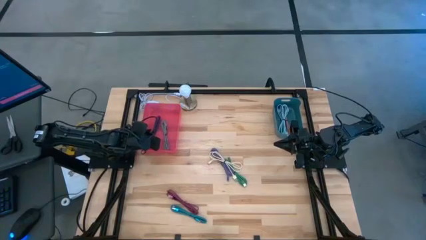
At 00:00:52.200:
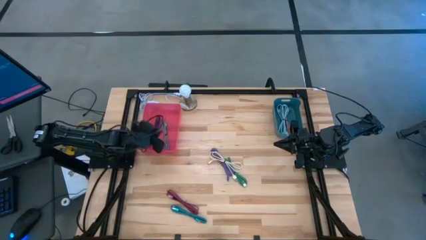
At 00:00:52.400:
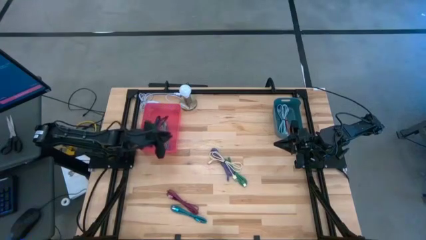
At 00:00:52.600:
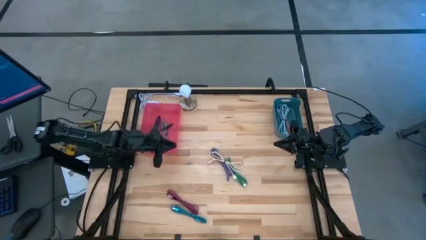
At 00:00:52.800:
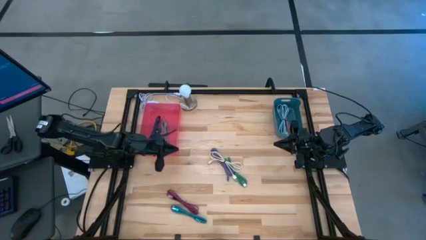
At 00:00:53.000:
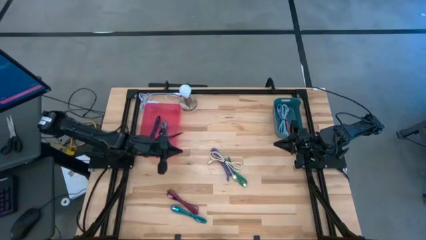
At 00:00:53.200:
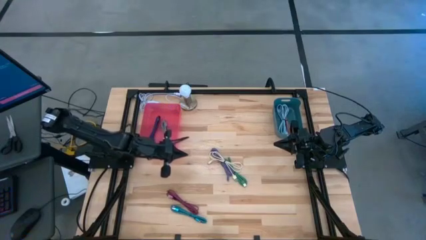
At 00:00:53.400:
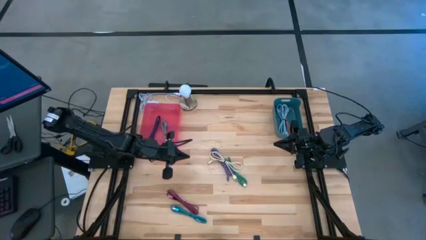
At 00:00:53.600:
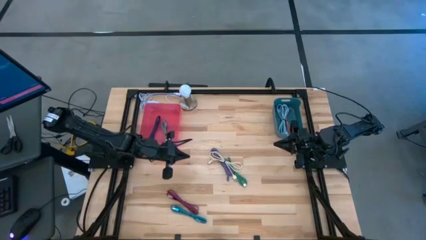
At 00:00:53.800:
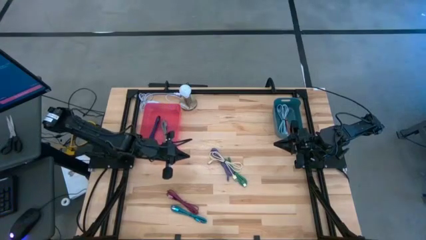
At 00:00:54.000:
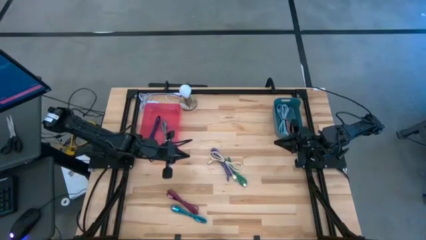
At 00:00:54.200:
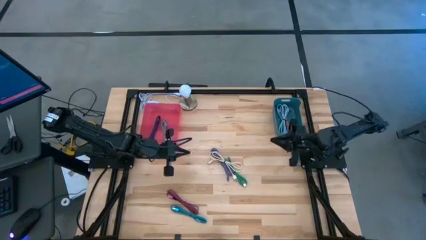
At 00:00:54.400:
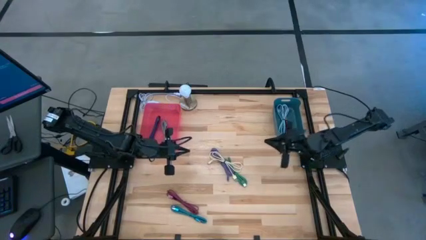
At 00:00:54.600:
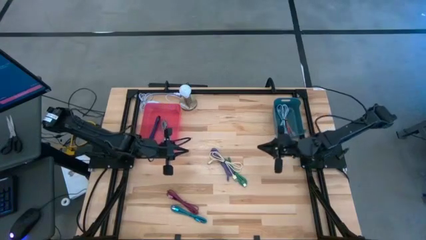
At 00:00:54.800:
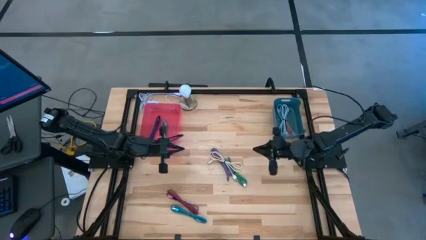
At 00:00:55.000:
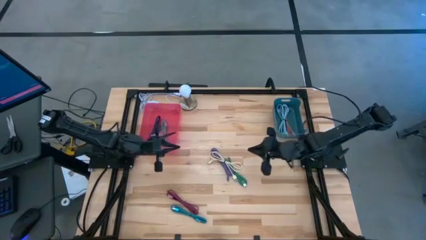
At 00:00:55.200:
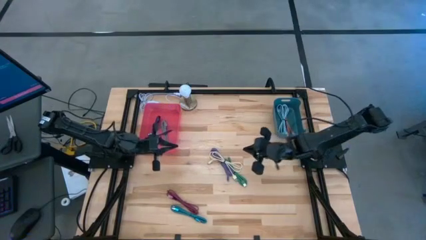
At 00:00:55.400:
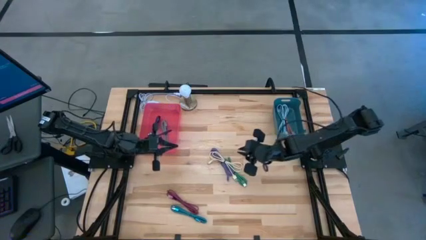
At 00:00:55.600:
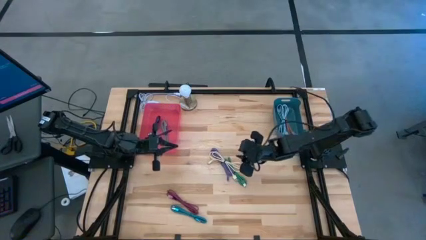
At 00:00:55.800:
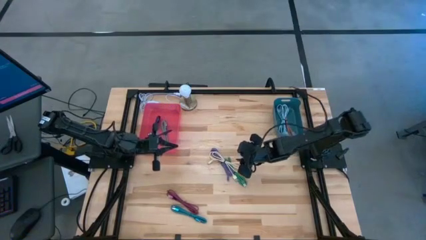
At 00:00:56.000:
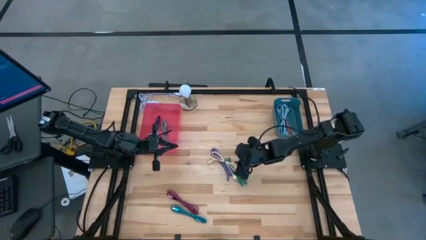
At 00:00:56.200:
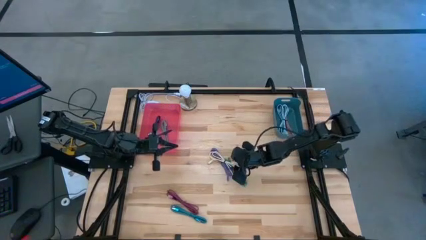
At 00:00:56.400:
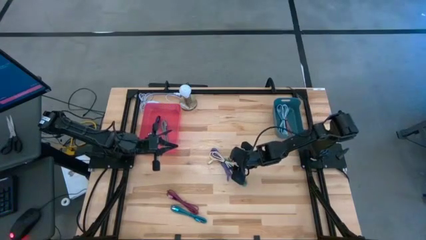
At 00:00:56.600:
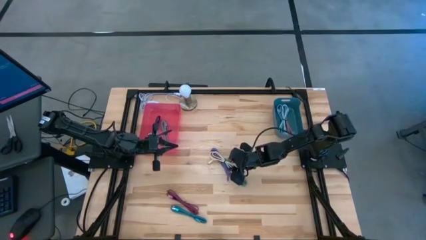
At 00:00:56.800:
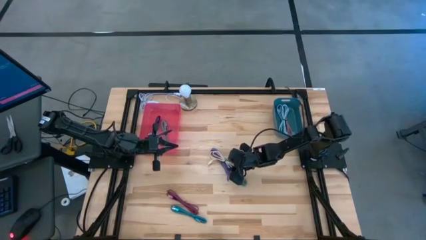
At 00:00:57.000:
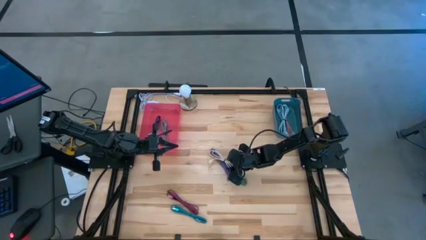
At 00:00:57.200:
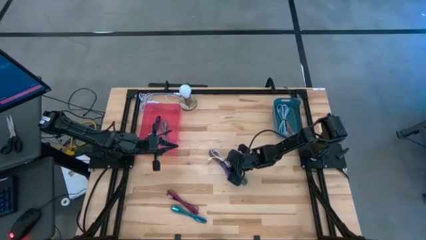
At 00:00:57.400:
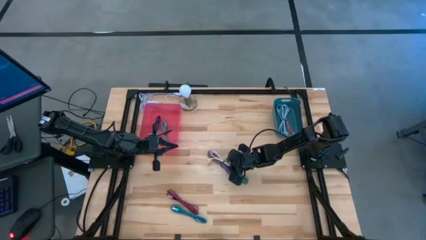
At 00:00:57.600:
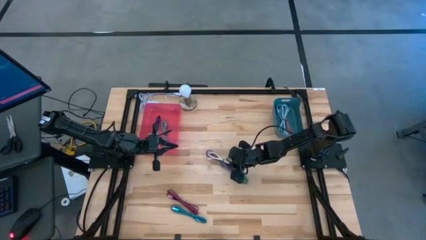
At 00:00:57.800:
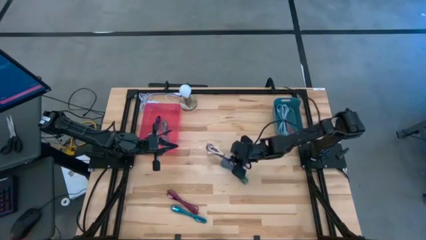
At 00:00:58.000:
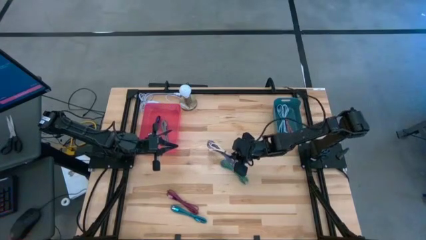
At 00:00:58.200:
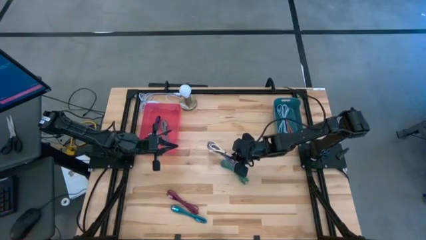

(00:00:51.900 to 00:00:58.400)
Task: Pick & Place USB Port
Put the white charger cable into the blue bin

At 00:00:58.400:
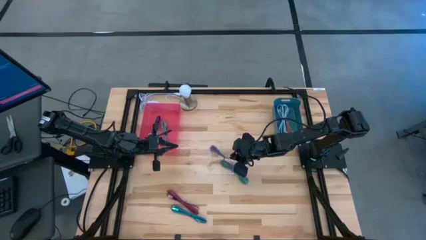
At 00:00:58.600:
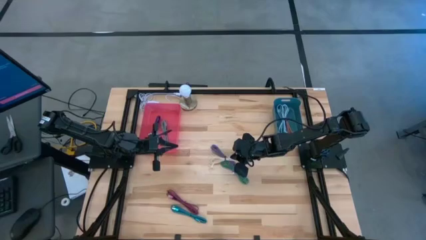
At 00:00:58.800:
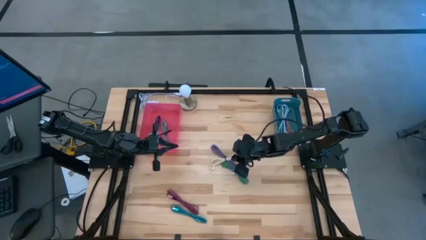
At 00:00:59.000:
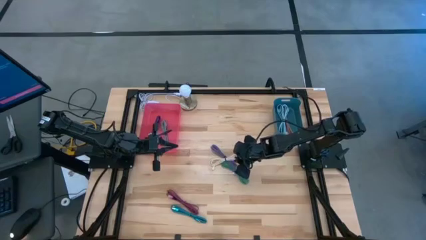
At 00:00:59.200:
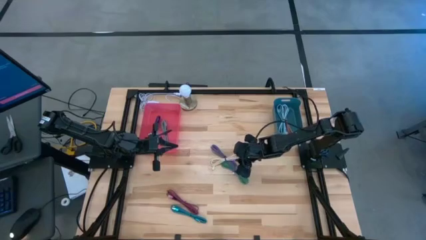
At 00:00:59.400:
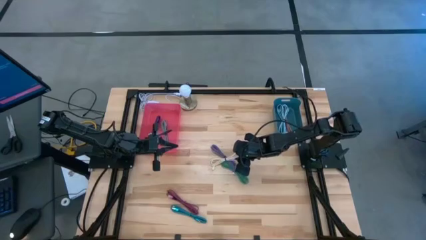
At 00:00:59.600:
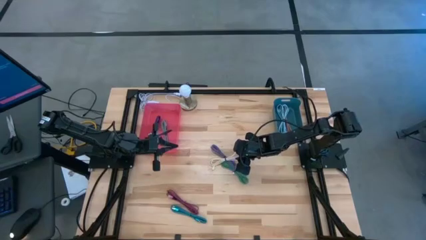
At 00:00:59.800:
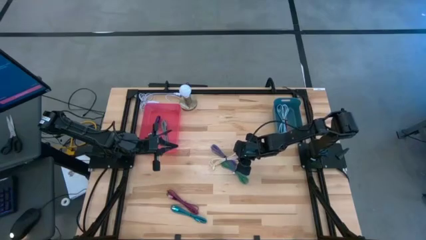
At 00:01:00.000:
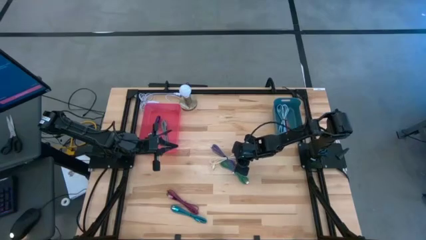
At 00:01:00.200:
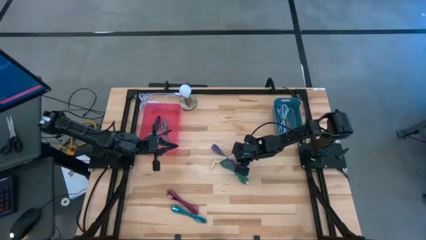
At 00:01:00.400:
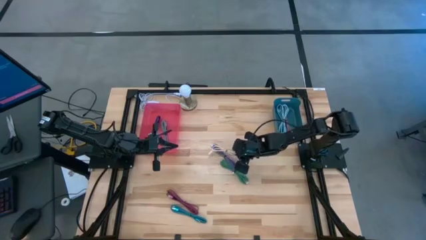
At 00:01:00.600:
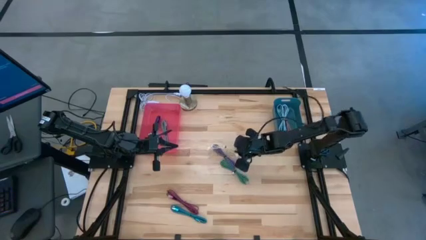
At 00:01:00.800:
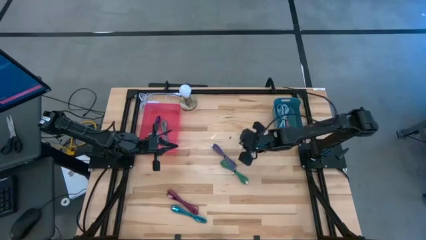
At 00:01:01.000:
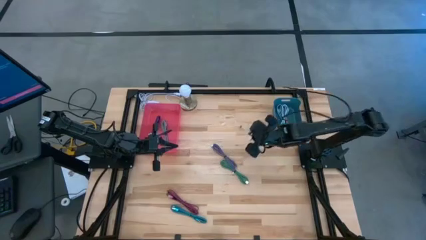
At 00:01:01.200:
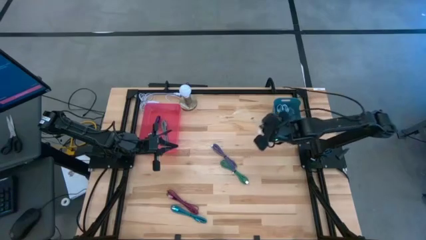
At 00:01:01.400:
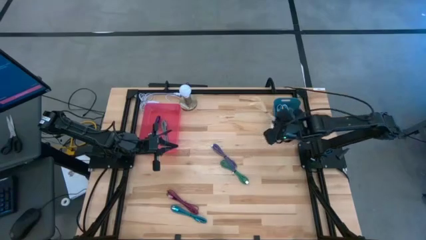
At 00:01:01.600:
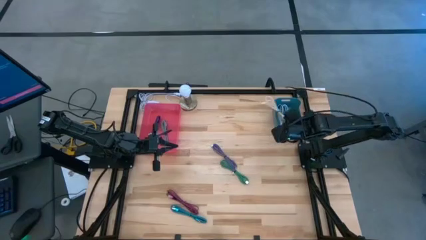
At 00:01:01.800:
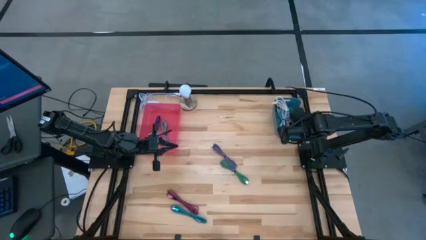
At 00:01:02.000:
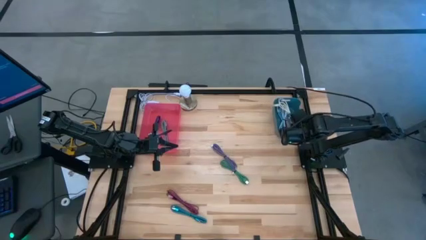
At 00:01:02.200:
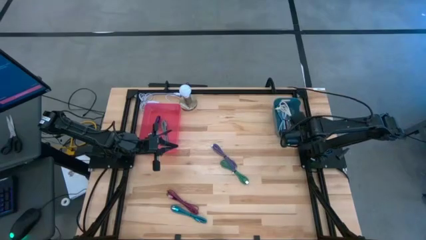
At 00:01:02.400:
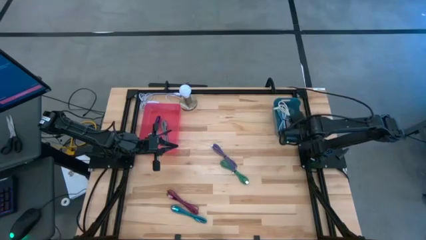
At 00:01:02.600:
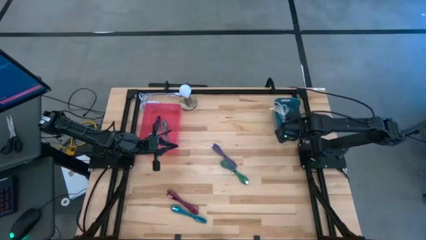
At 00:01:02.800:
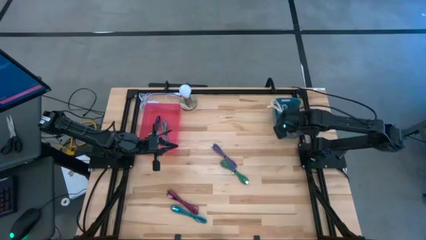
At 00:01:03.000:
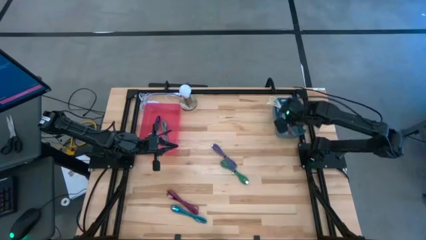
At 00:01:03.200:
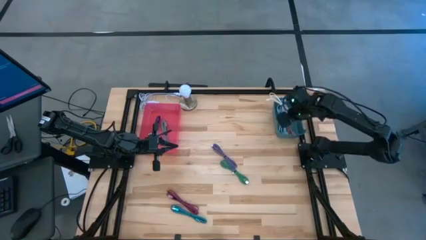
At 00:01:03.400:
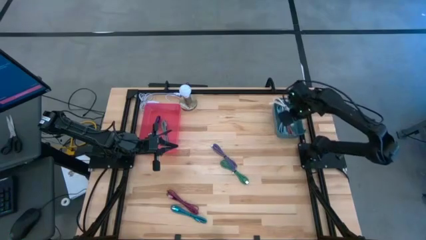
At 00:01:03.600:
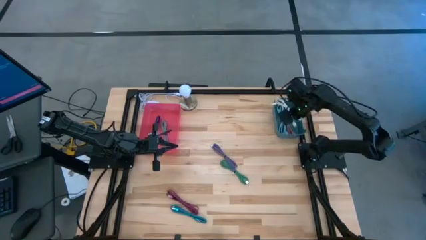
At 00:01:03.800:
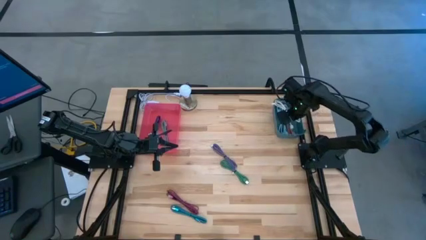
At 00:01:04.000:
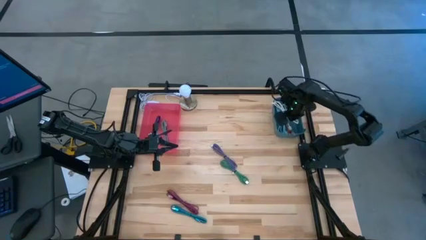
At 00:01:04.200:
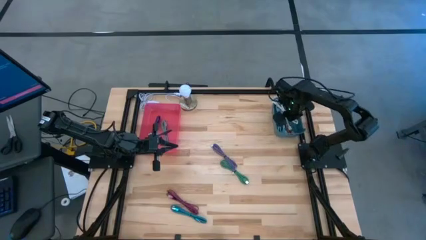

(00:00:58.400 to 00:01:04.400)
Put the white charger cable into the blue bin

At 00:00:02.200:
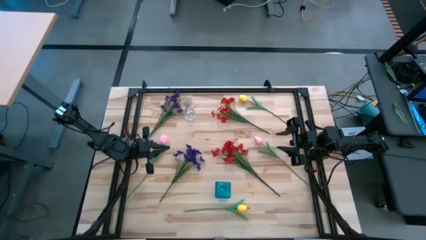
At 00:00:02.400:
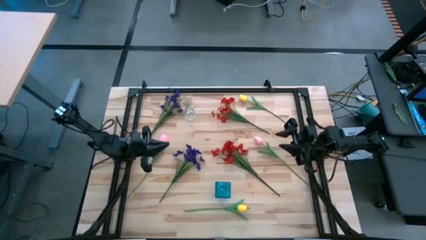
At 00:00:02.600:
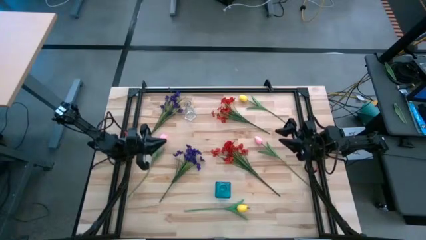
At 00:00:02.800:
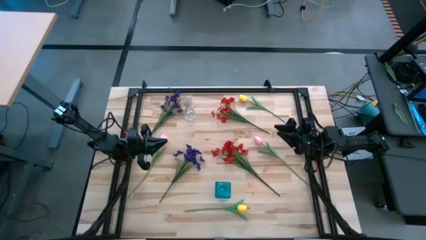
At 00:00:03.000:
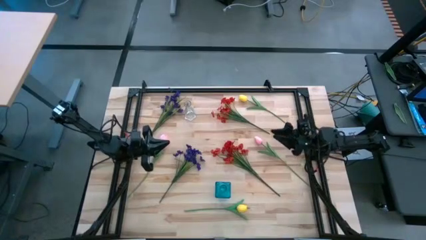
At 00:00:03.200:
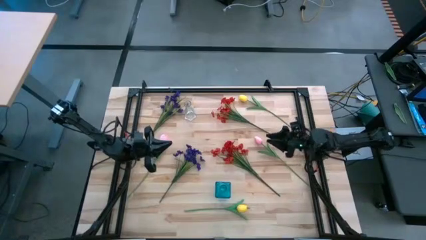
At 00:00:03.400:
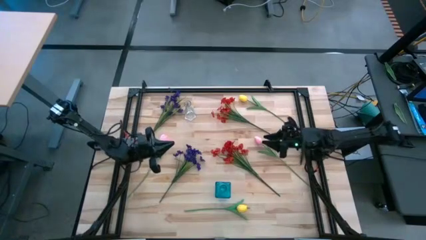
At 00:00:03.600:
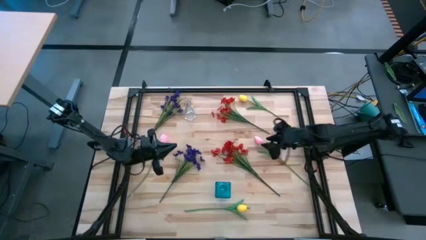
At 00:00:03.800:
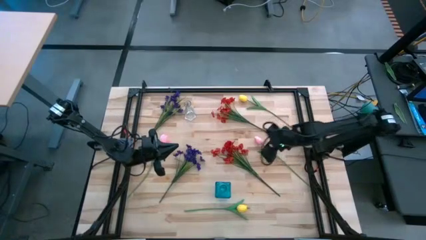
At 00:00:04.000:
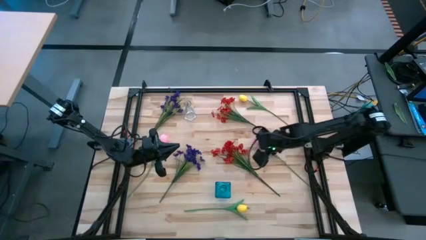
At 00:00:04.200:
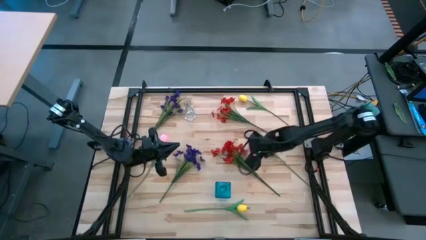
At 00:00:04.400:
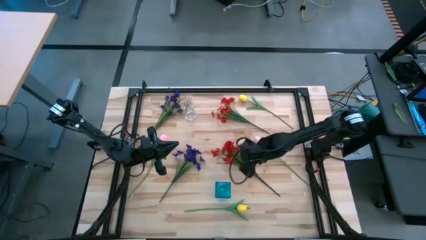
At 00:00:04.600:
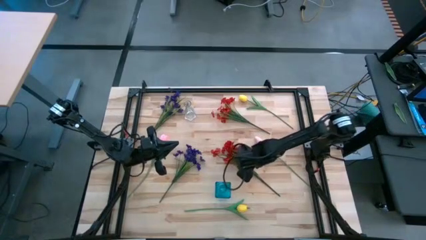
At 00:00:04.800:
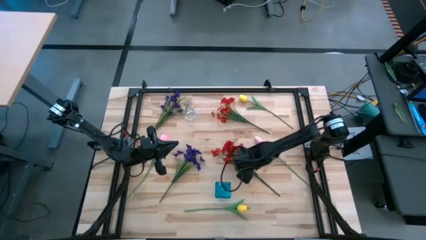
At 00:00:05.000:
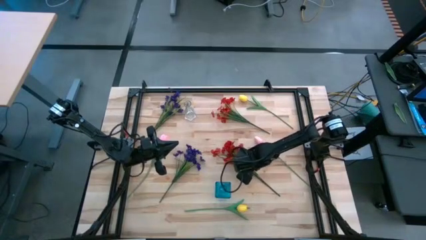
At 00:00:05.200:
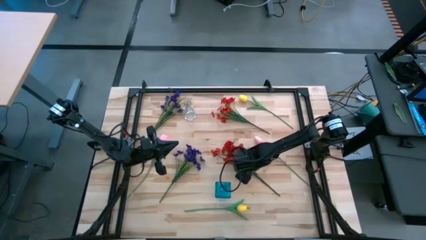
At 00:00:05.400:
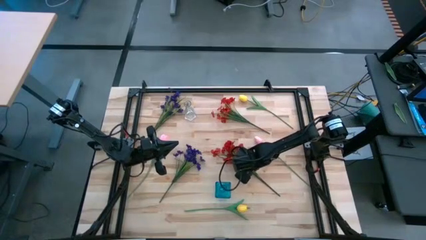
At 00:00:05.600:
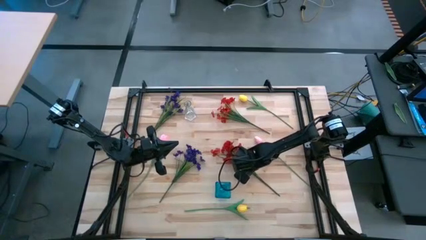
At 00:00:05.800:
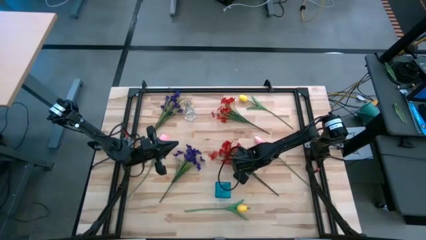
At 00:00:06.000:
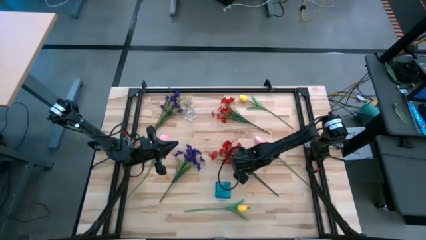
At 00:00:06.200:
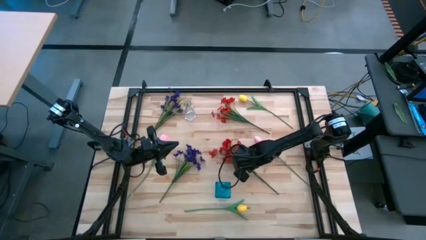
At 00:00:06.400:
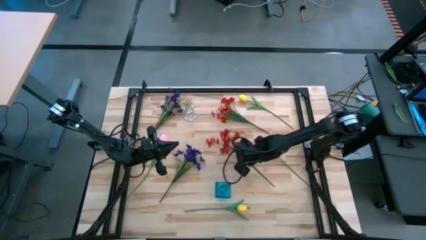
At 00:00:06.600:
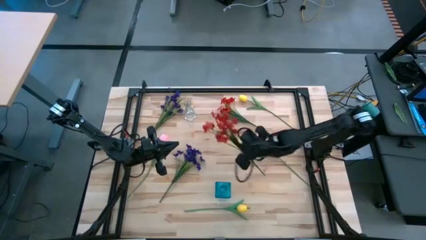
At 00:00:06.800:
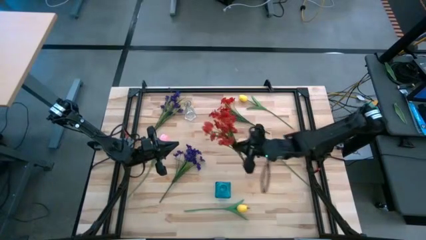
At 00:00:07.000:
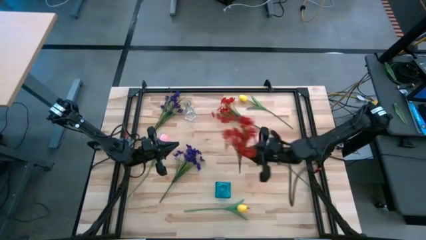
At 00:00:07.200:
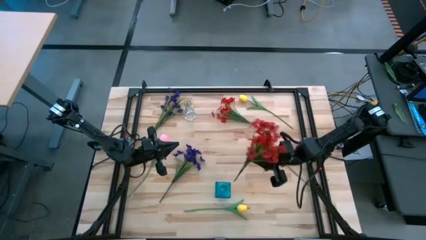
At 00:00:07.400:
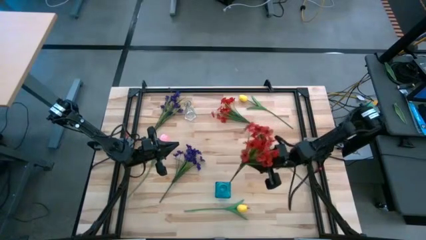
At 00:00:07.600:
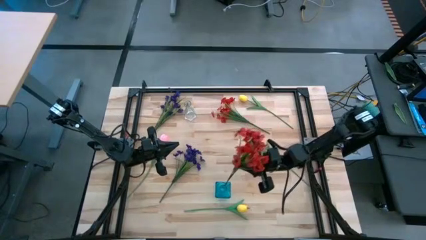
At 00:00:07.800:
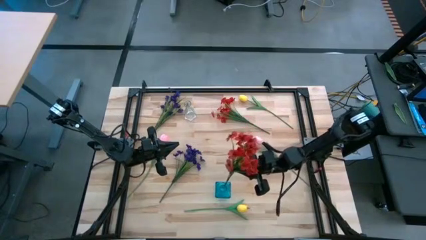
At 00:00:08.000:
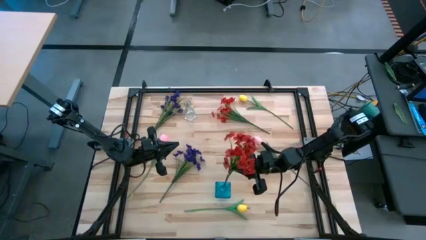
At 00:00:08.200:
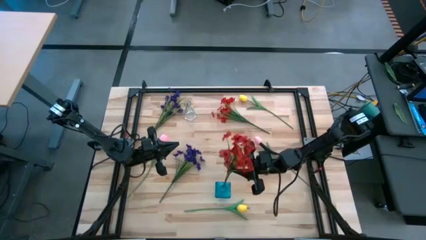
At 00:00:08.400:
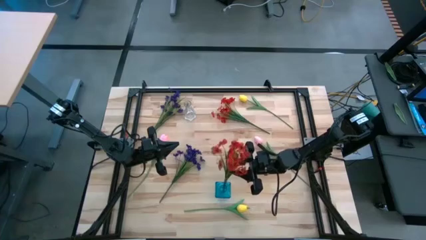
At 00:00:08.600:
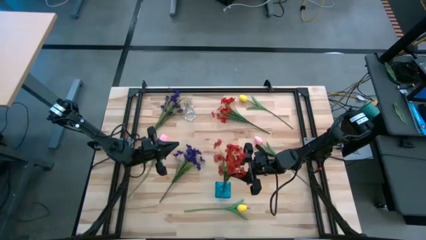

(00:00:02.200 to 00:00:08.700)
Task: Sort flowers into vase by color
Put the bottom red flowers into the blue vase
